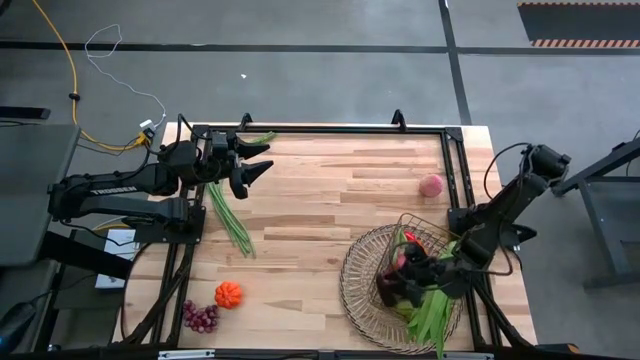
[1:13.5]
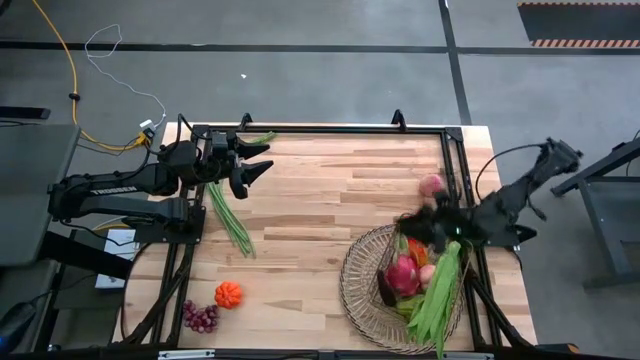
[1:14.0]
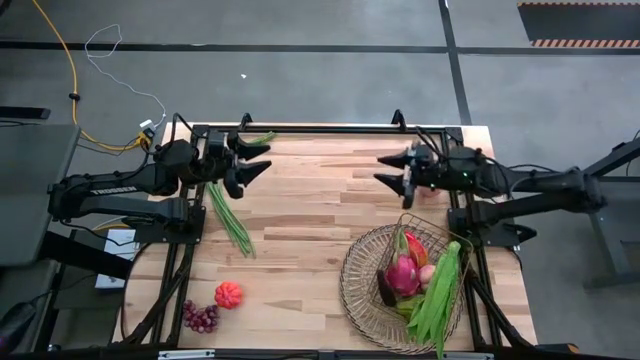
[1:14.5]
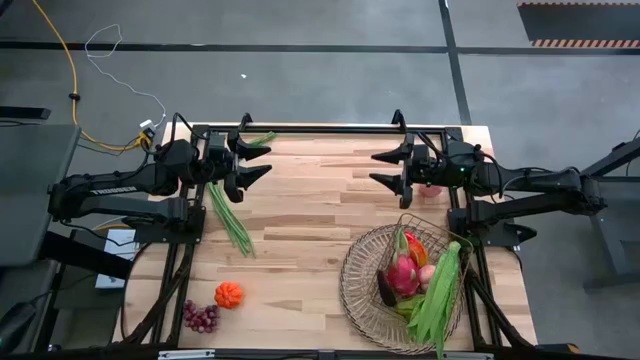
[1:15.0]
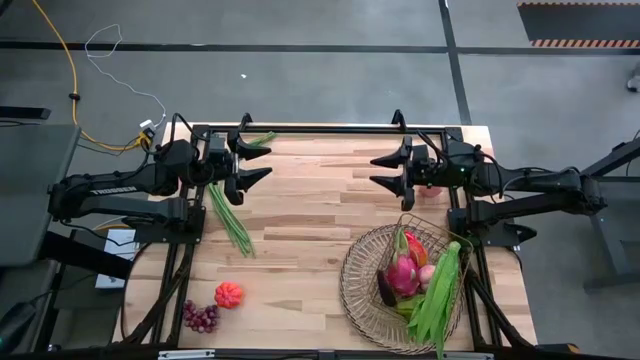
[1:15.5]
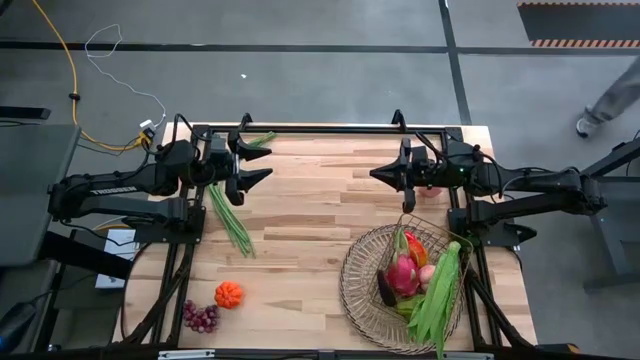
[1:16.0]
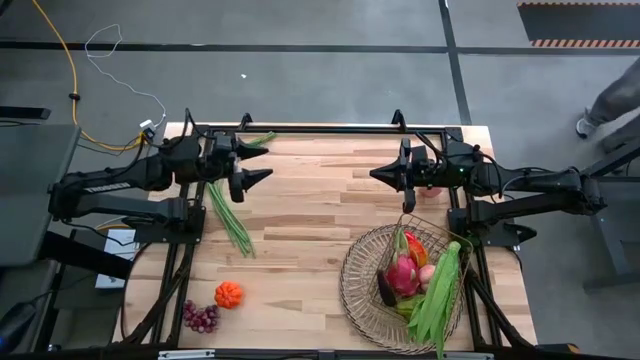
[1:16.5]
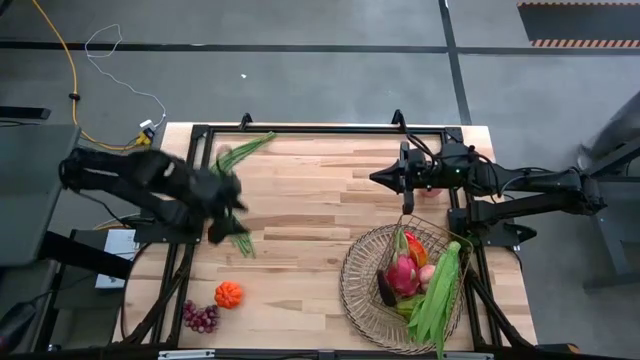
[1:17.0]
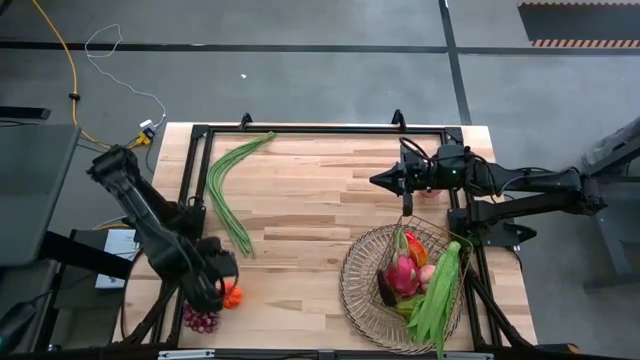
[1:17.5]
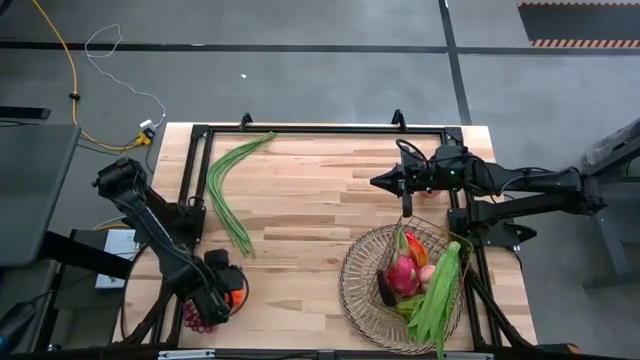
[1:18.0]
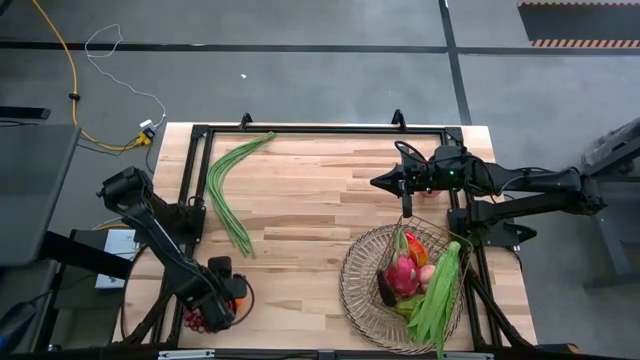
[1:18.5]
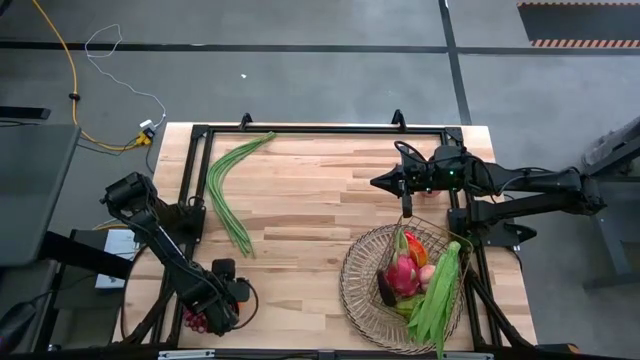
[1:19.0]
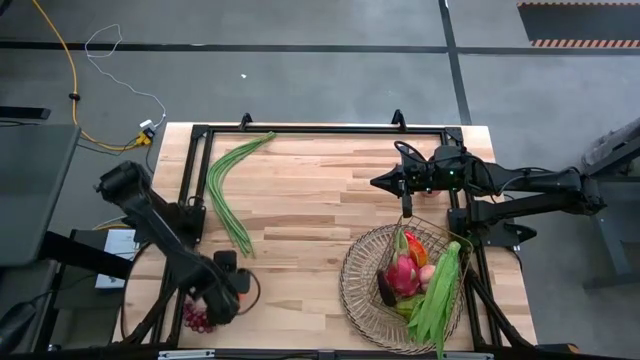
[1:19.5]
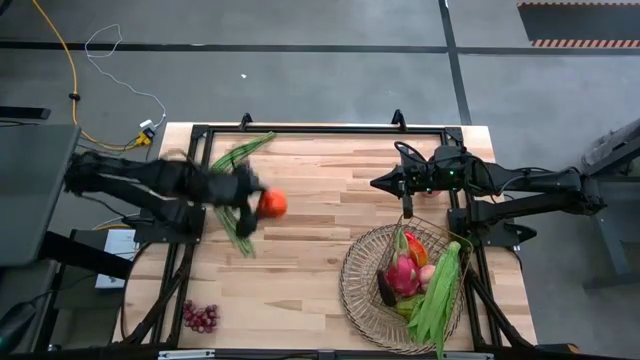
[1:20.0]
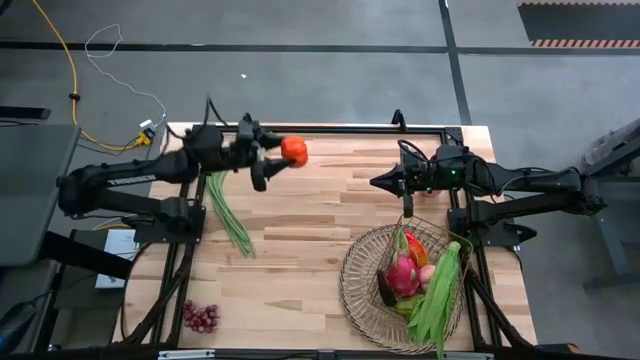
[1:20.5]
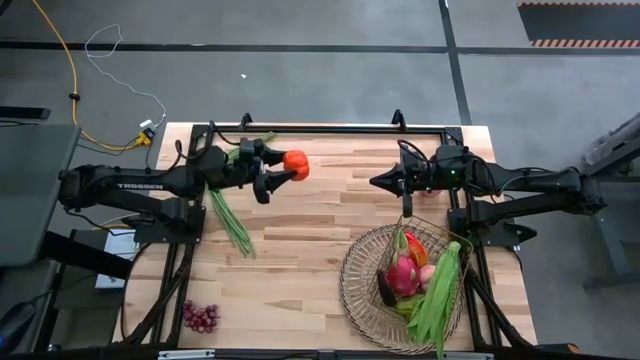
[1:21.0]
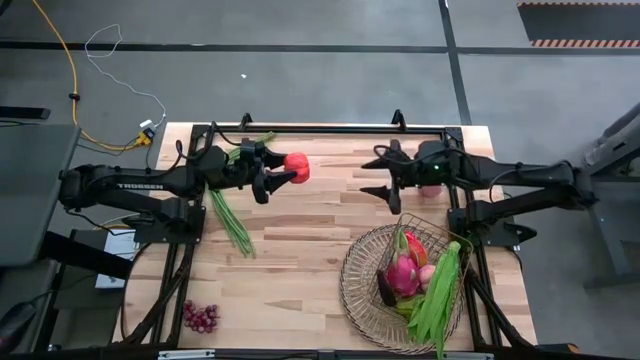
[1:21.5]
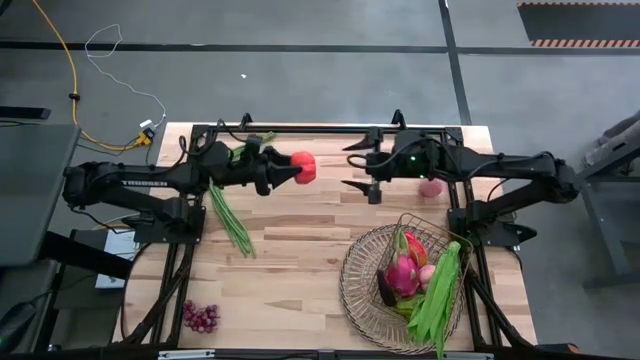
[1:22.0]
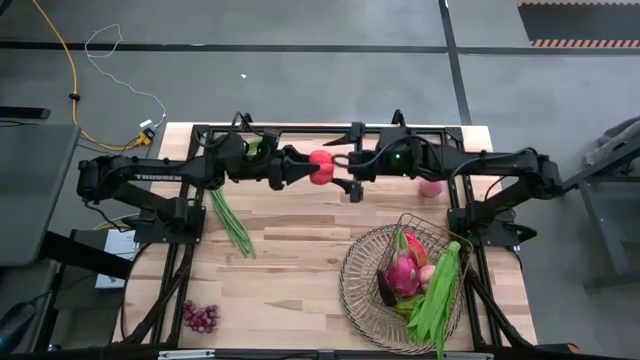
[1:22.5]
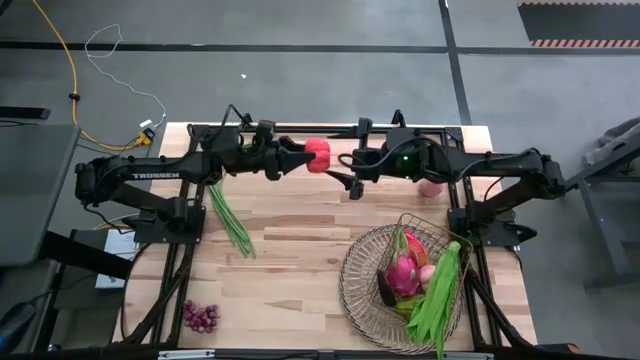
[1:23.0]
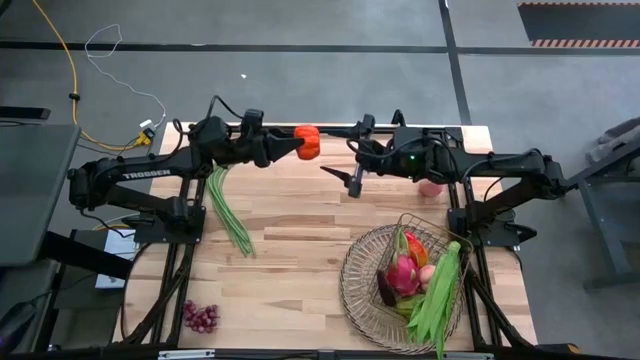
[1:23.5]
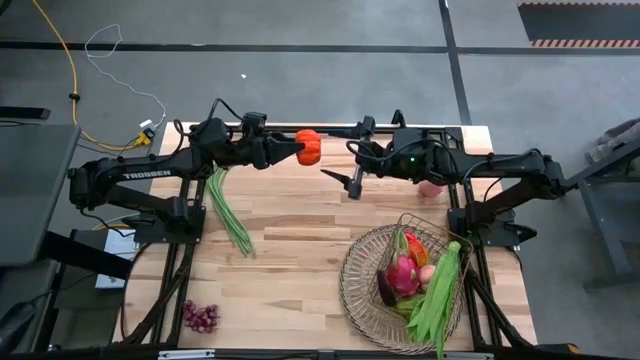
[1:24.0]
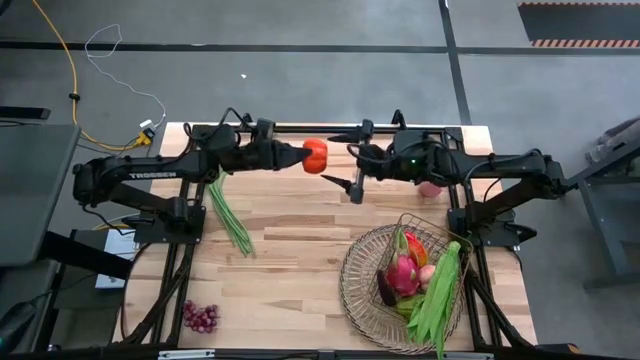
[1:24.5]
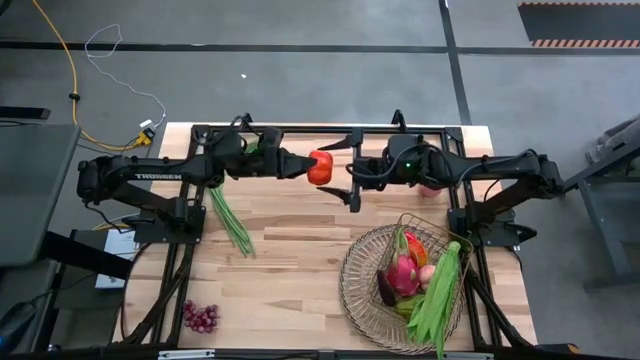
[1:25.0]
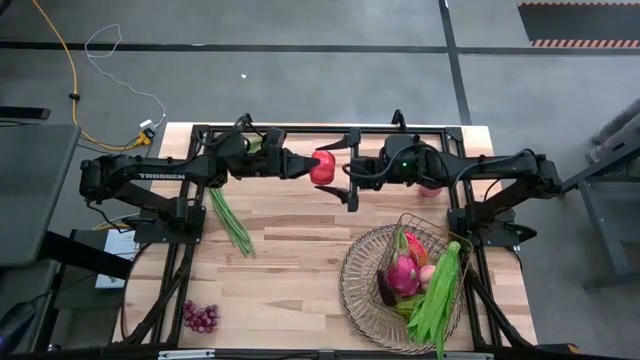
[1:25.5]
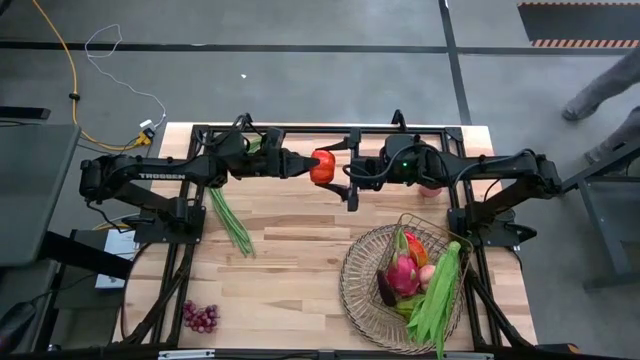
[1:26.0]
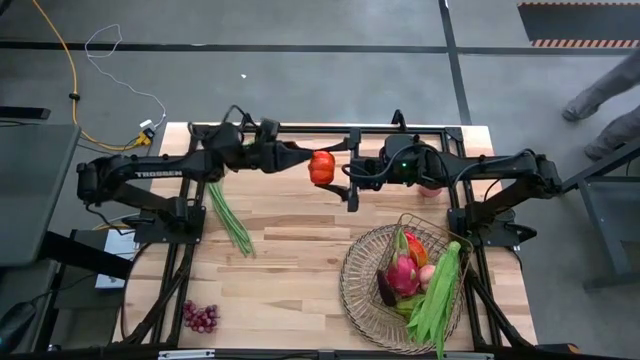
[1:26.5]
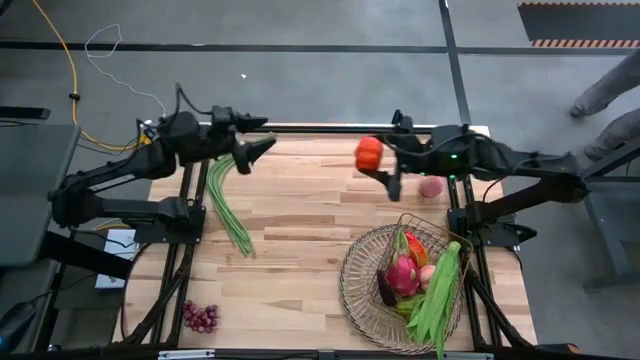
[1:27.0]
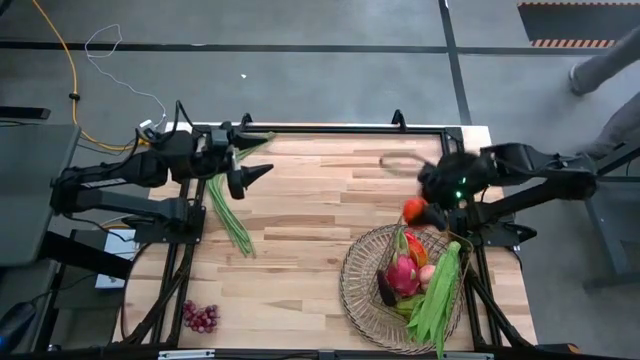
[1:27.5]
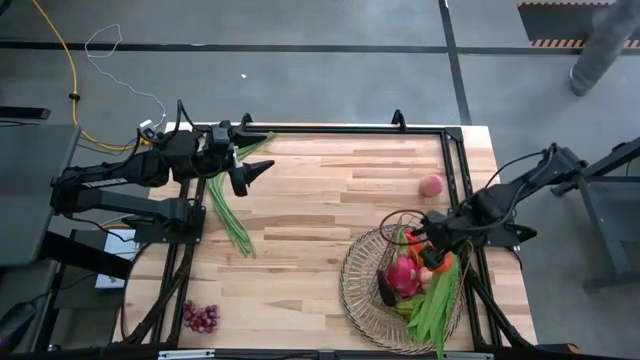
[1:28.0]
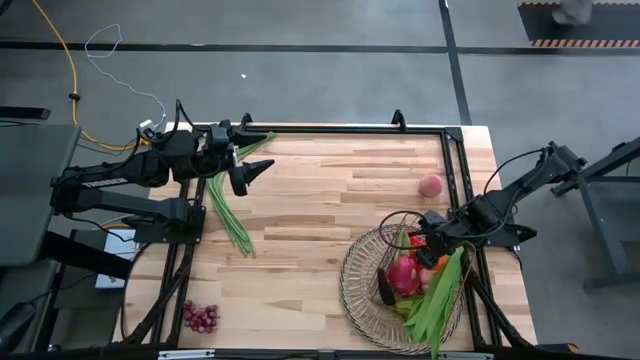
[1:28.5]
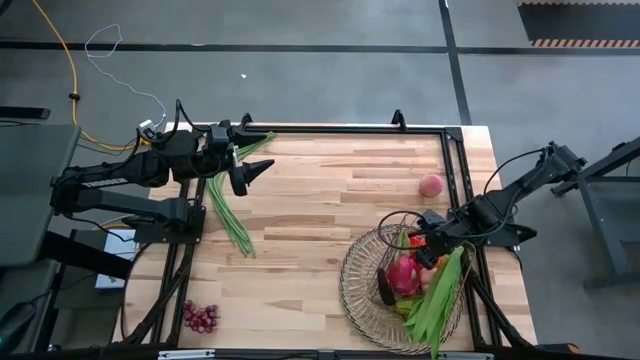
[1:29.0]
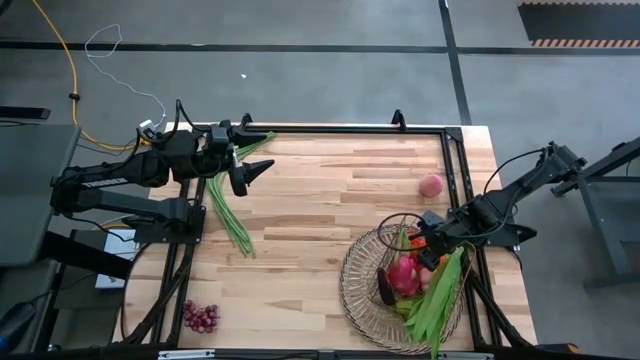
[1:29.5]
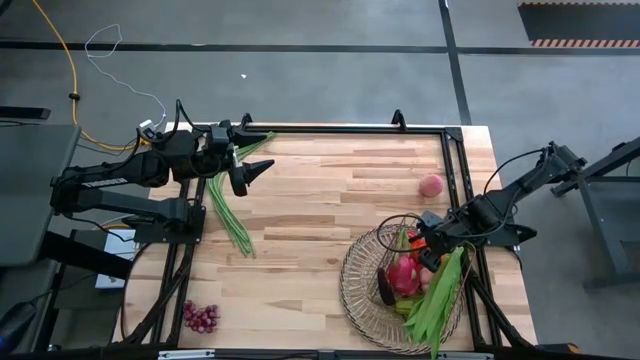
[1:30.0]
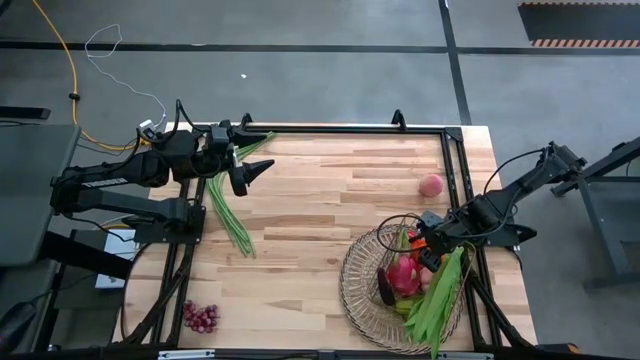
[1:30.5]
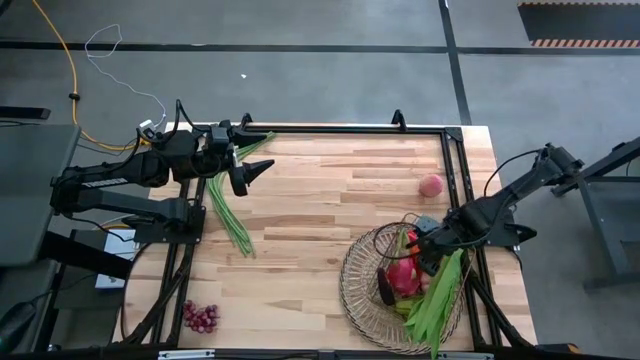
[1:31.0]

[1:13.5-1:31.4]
Task: Build produce basket
Put the red bell pepper into the wire basket

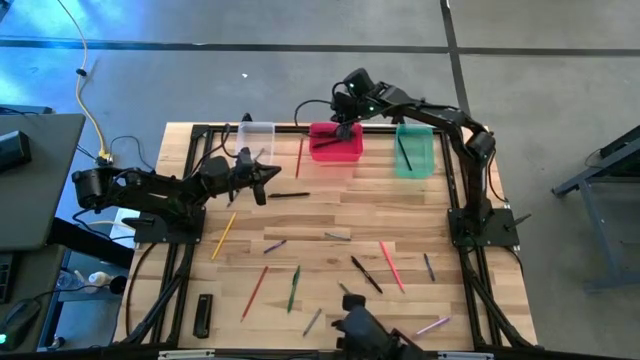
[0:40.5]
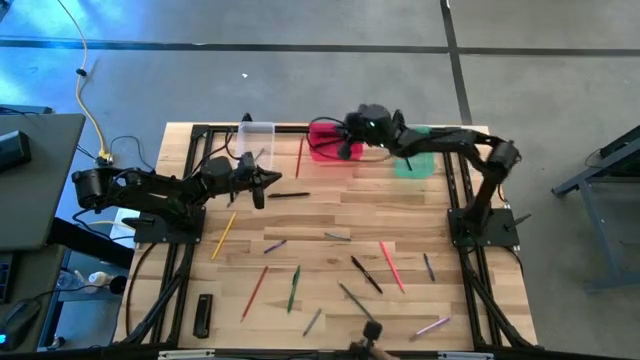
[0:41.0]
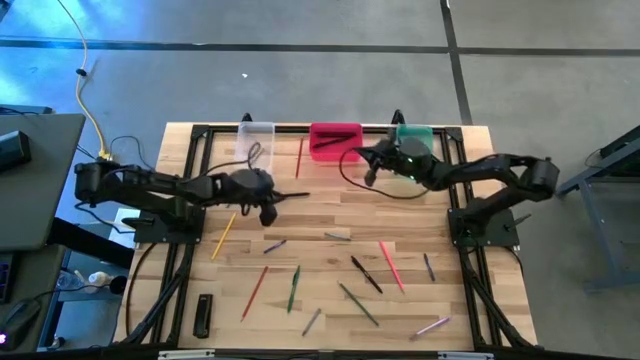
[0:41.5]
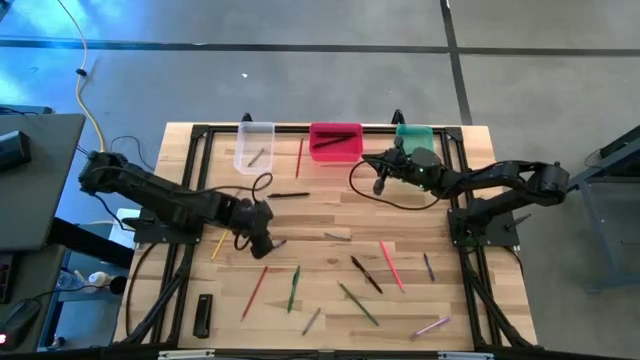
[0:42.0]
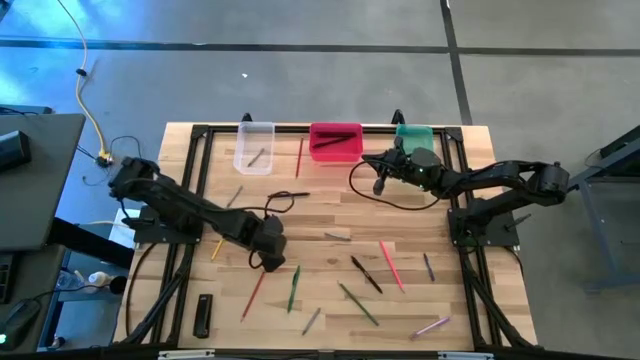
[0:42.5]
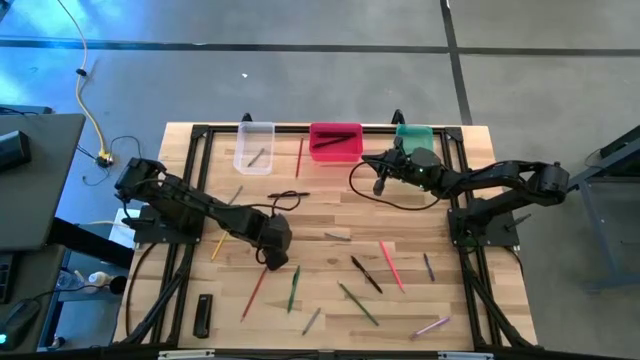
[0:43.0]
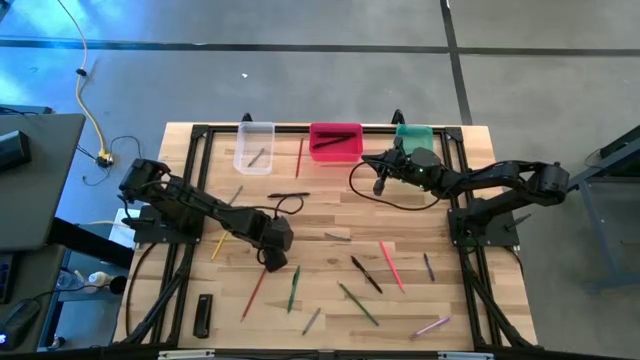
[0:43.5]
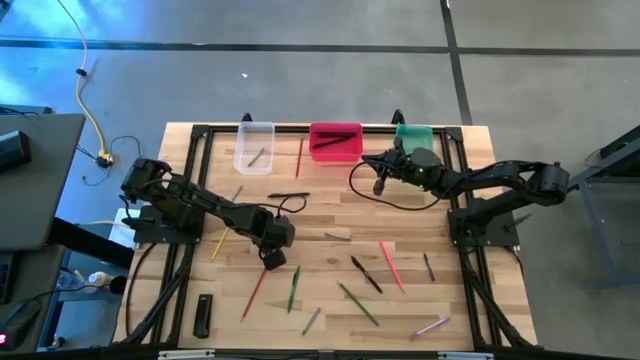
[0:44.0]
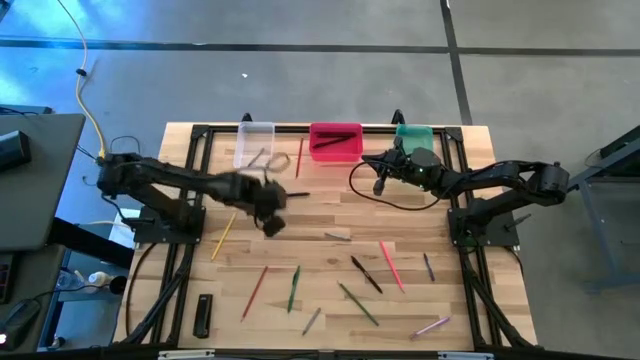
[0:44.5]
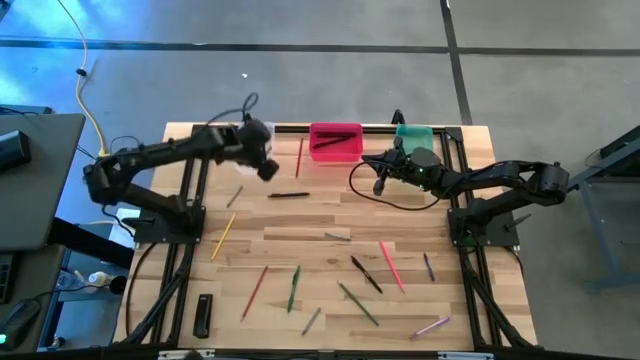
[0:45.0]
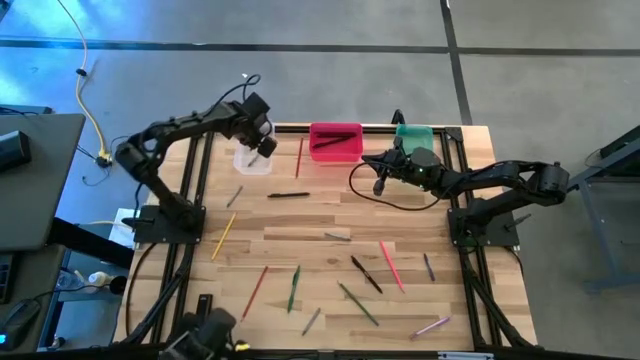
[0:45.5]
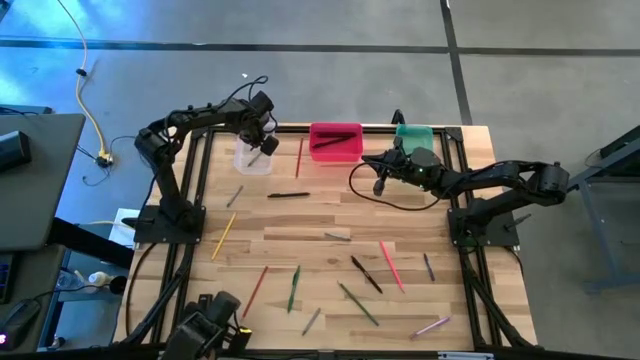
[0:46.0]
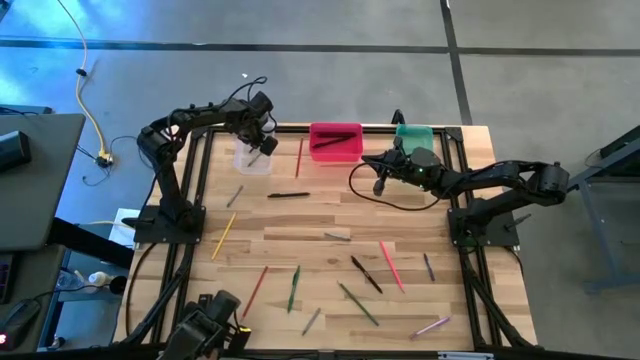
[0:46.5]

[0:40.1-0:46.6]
Task: Sort crayons/erasers/pens/pencils in bins
Put the top blue crayon into the transparent bin
